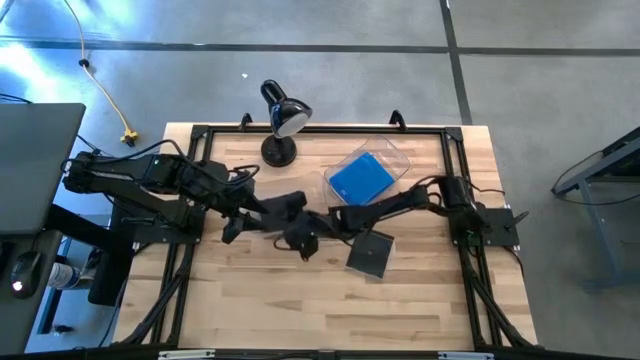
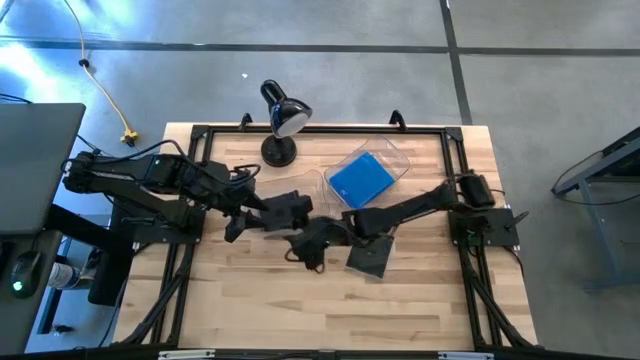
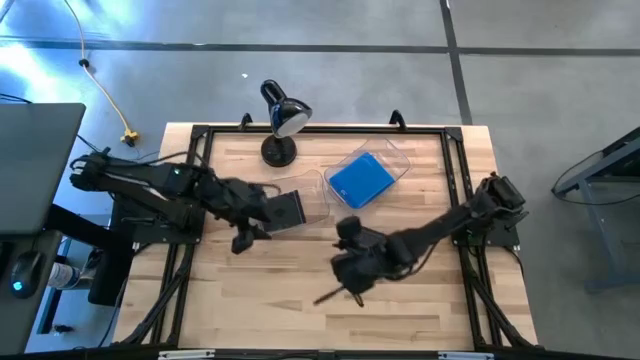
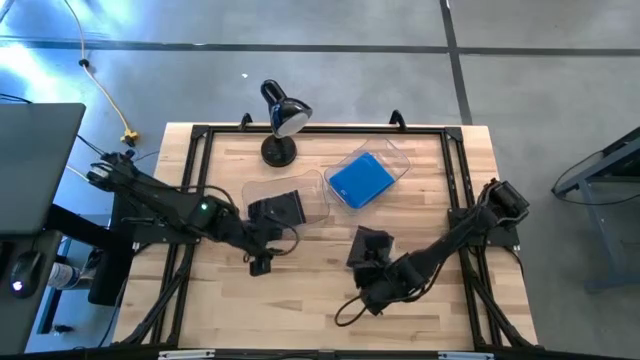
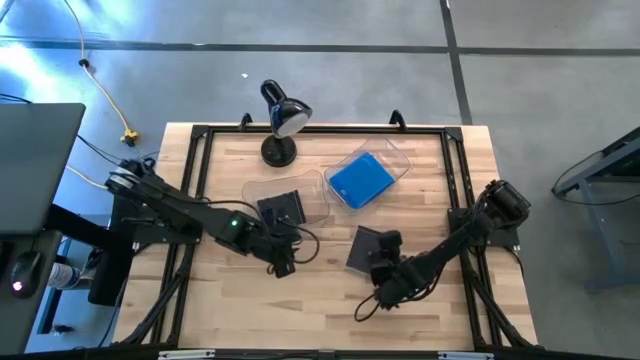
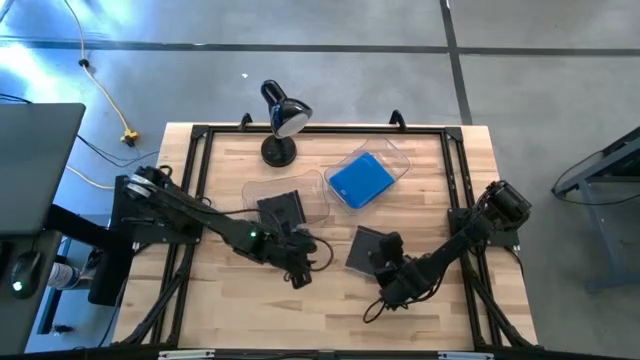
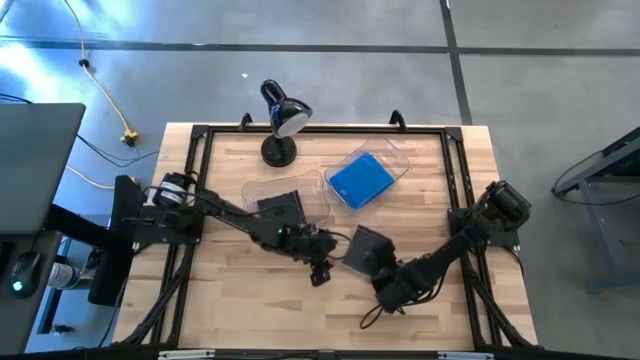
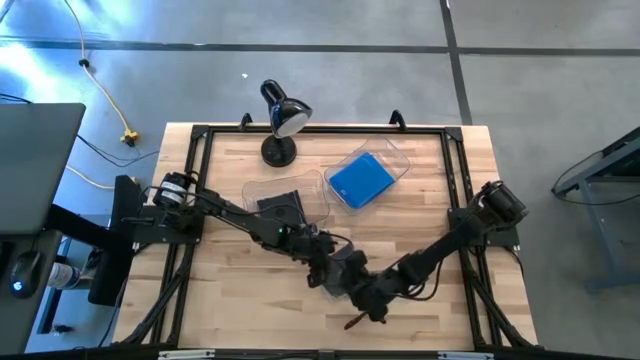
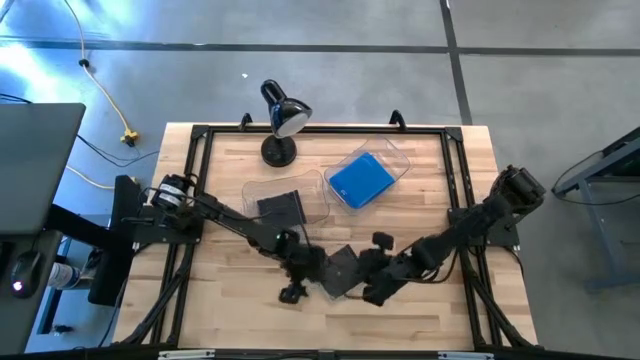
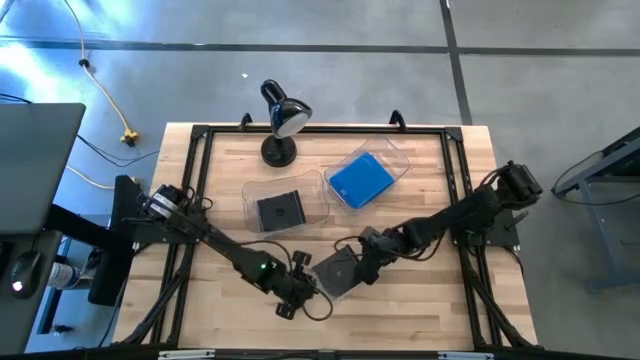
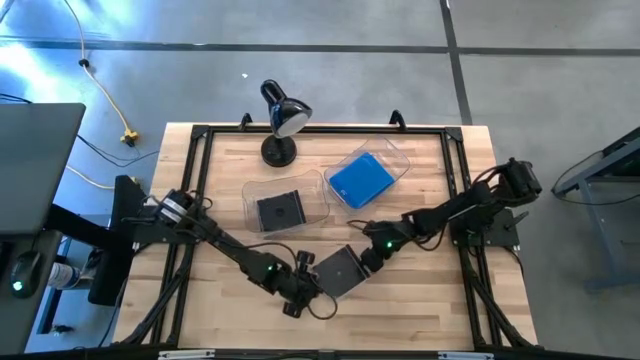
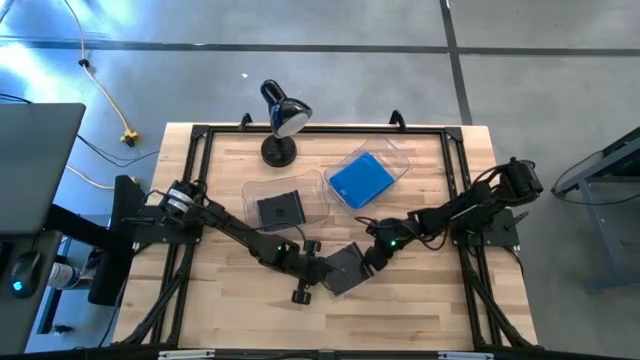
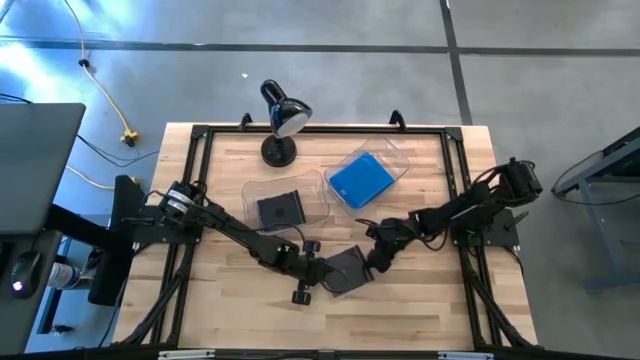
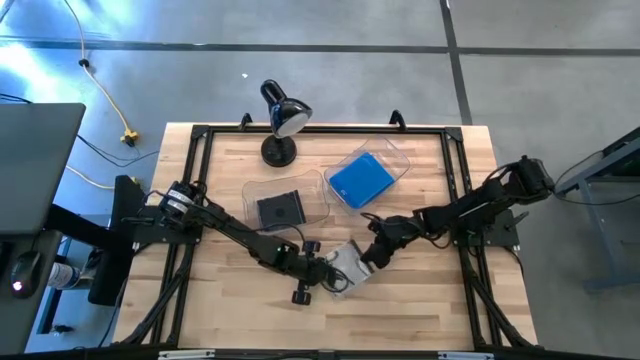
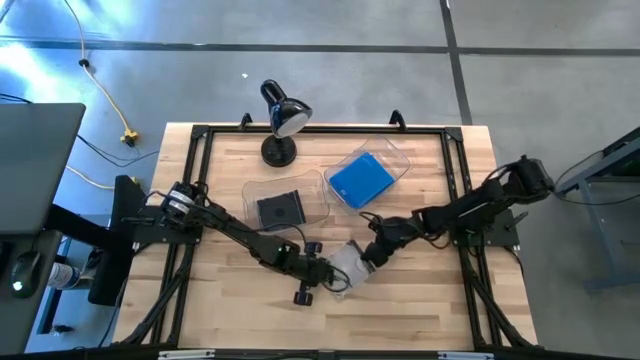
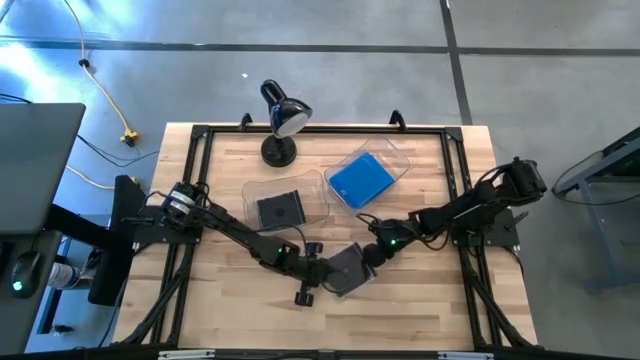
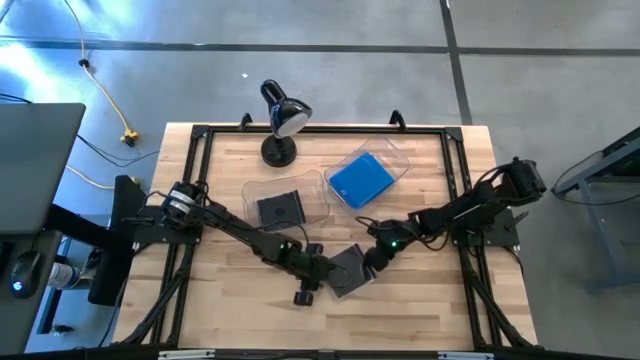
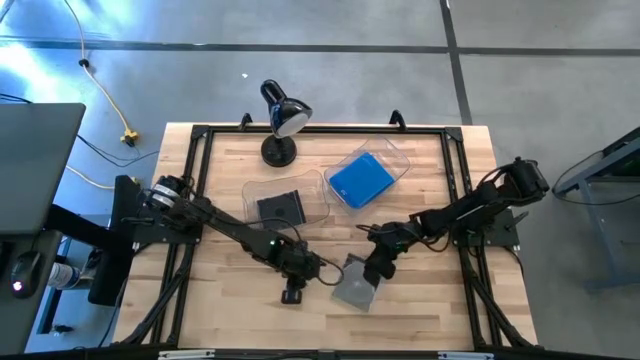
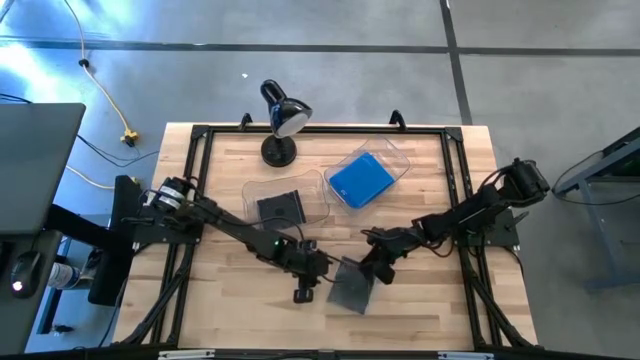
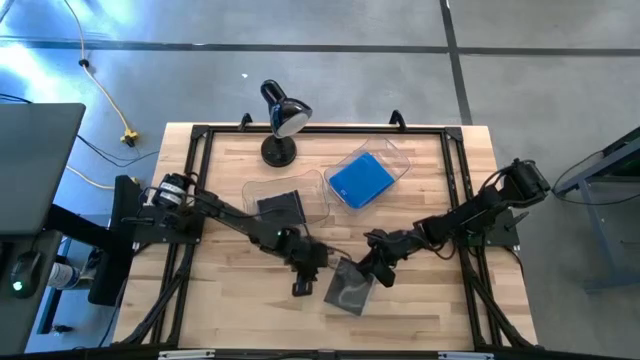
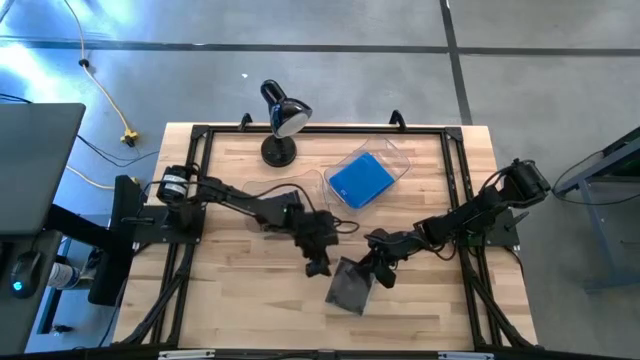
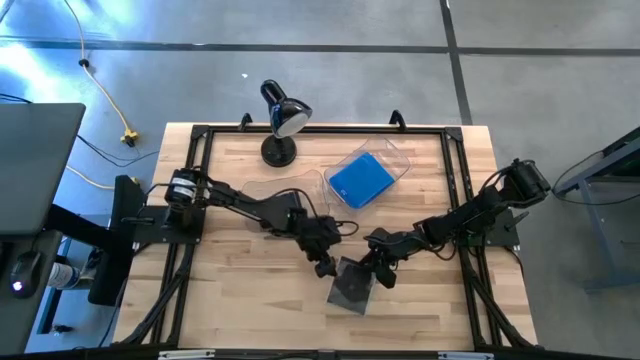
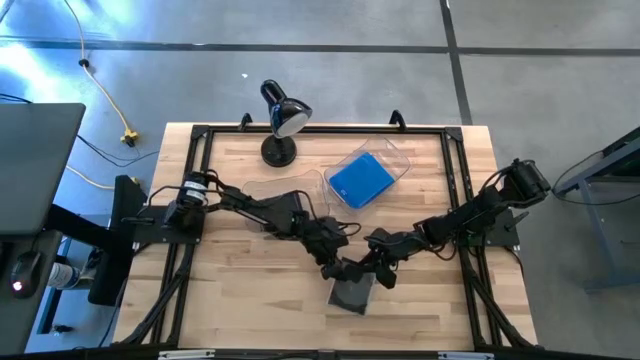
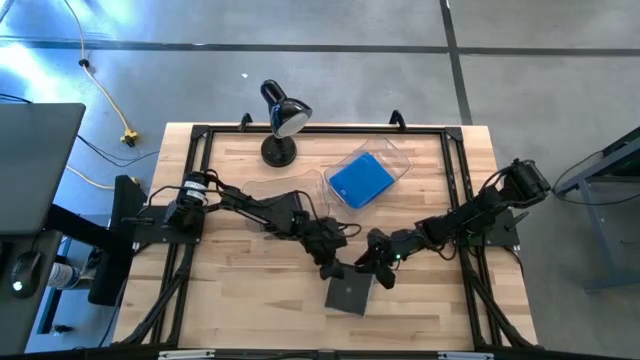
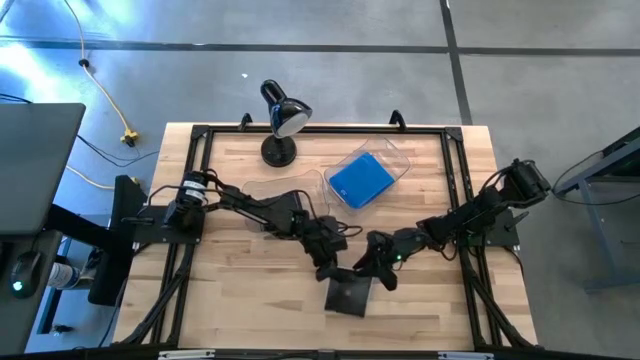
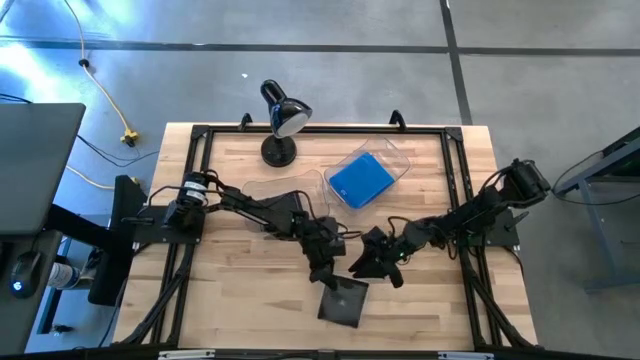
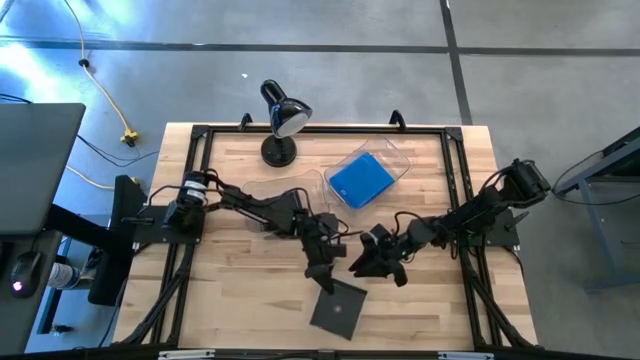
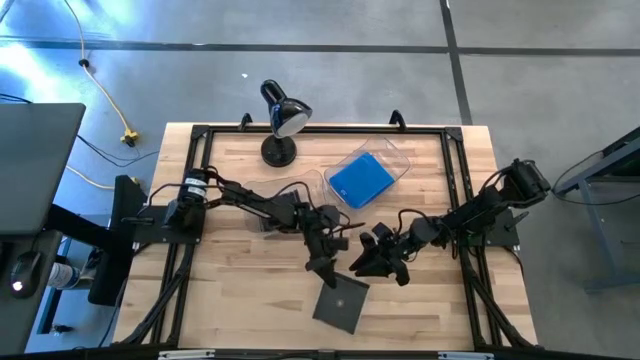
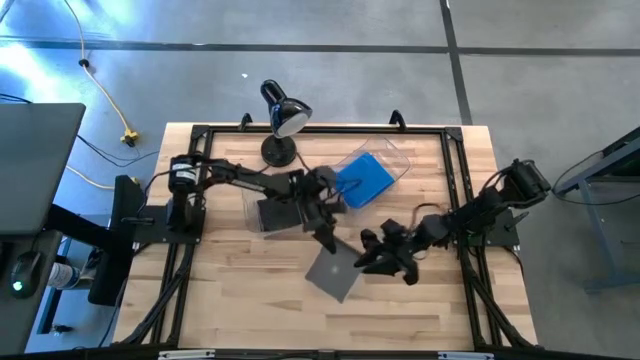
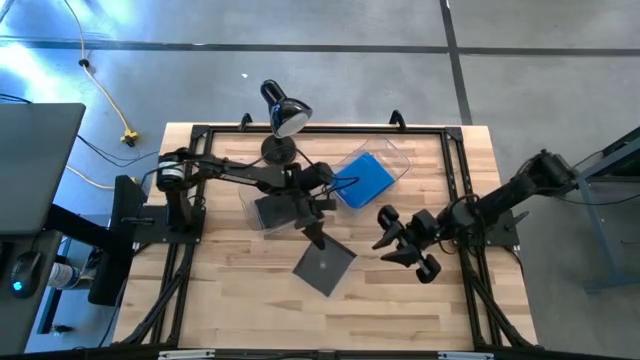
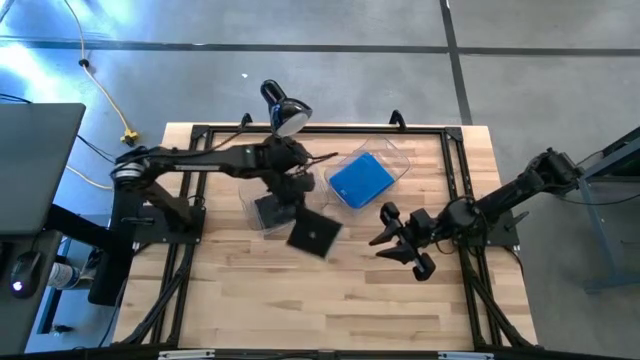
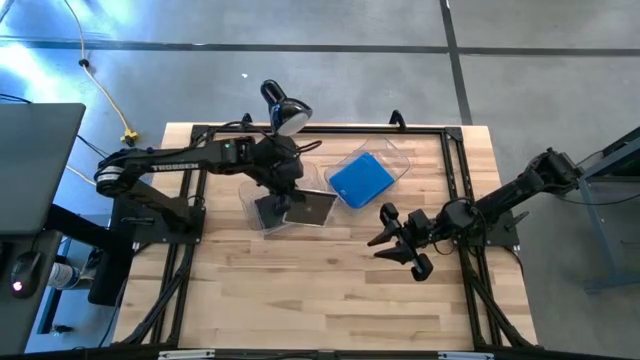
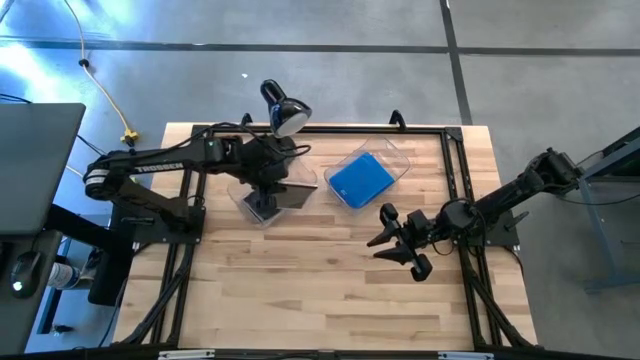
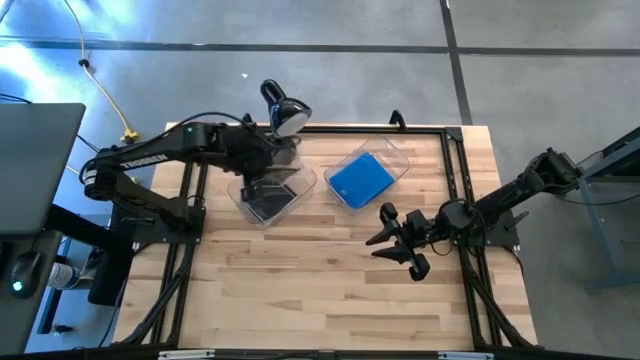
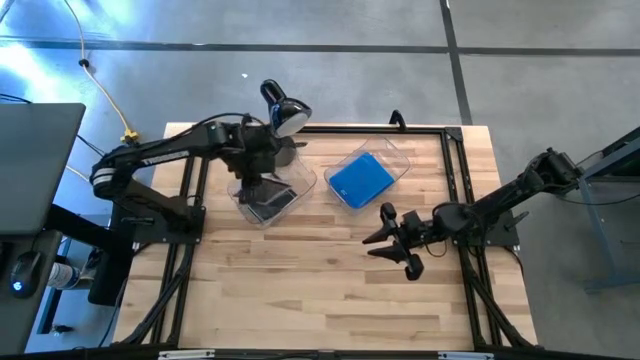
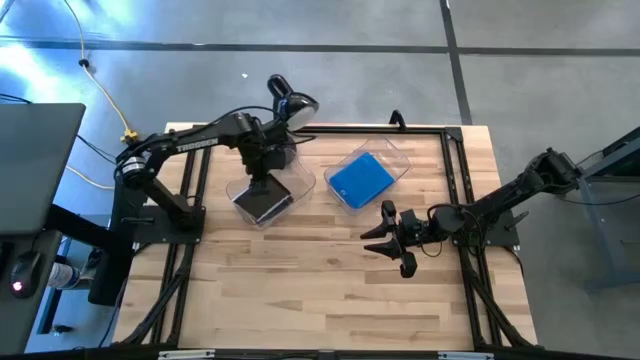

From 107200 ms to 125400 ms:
Task: Pick & place jewel cases by type
Put the black CD case into the left transparent bin

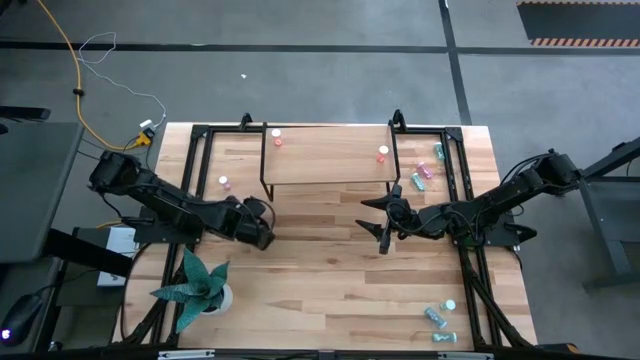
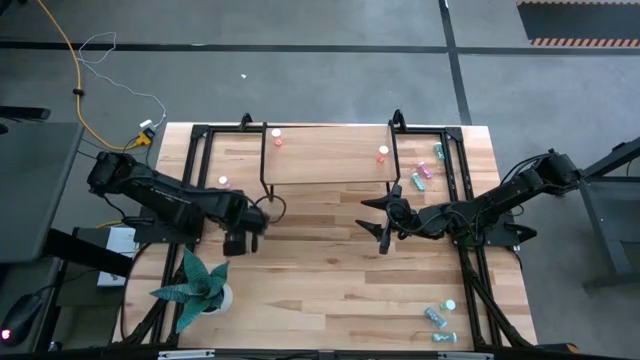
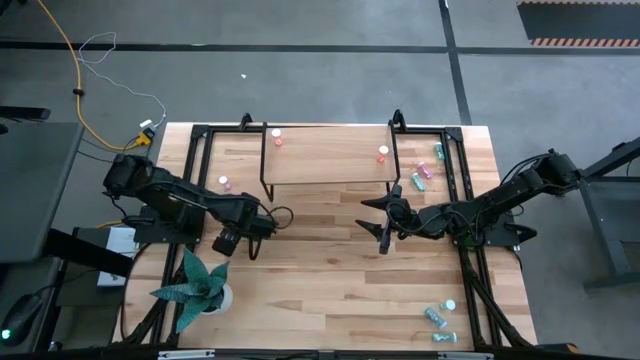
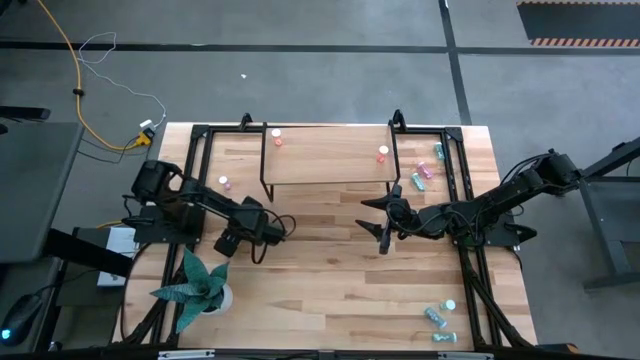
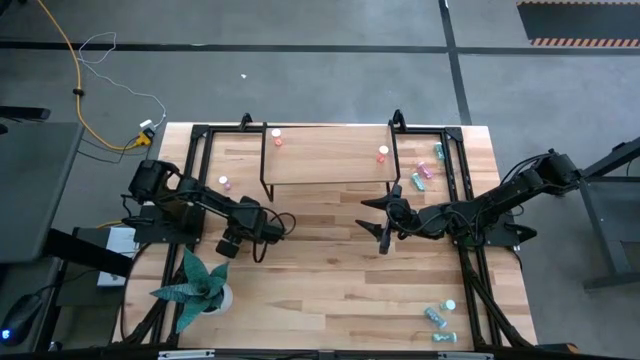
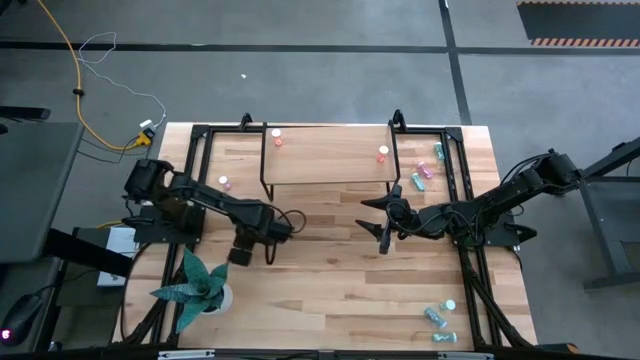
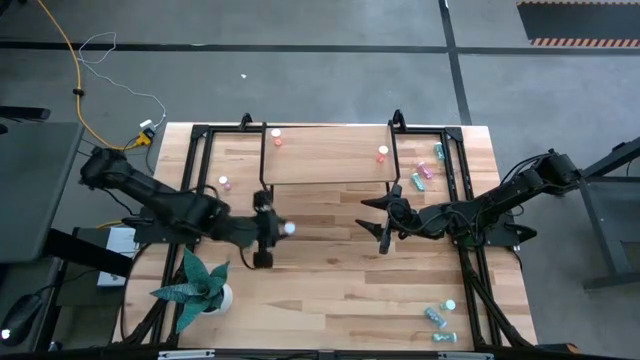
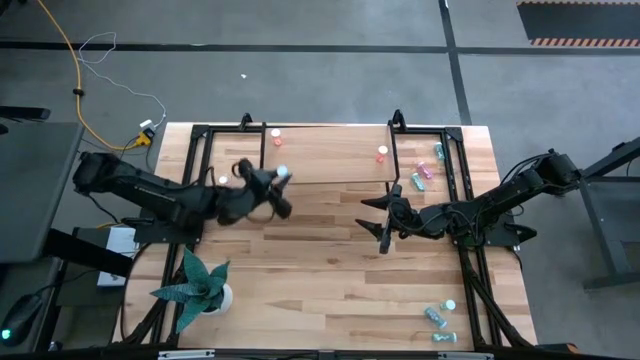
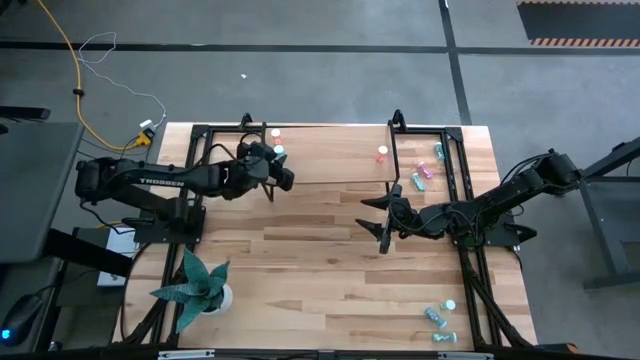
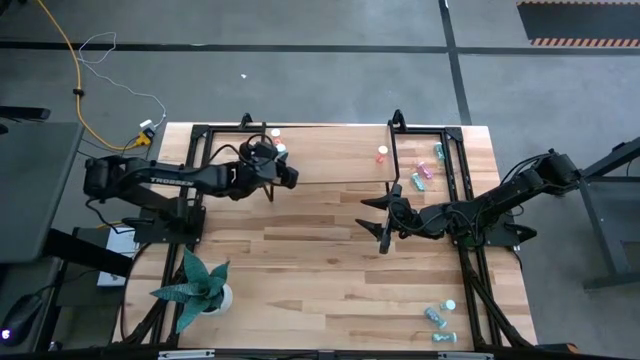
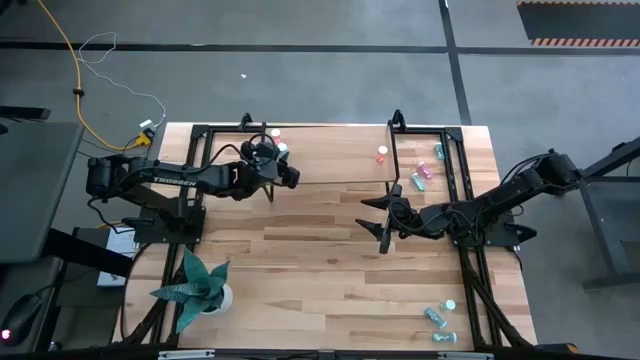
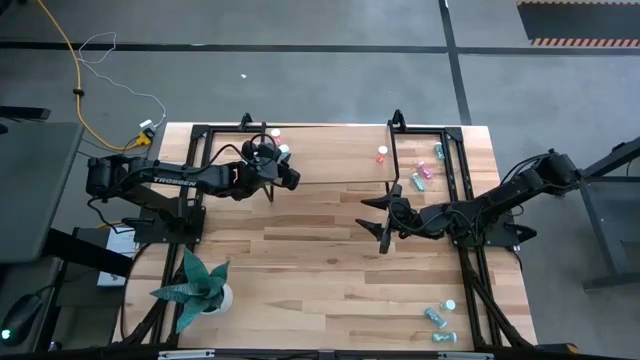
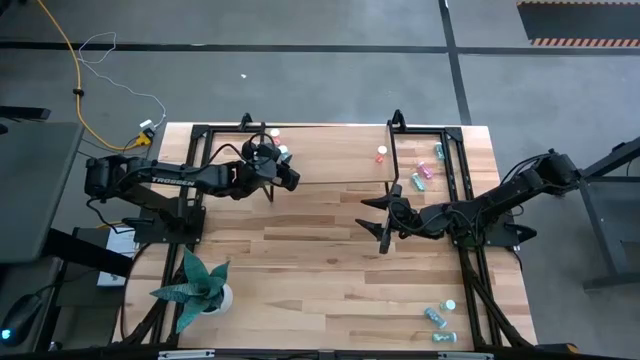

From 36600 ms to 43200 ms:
Task: Pick and place medicine bottles onto shelf by color
Put the blue pill bottle on the shelf
